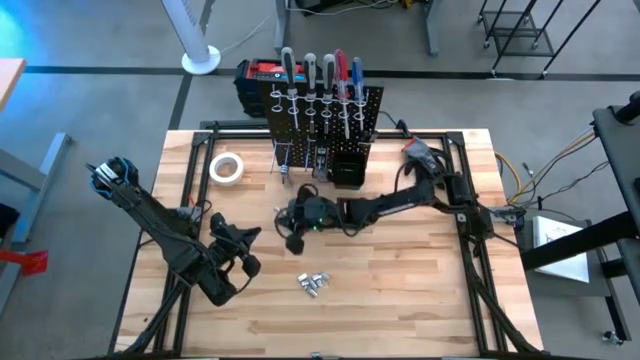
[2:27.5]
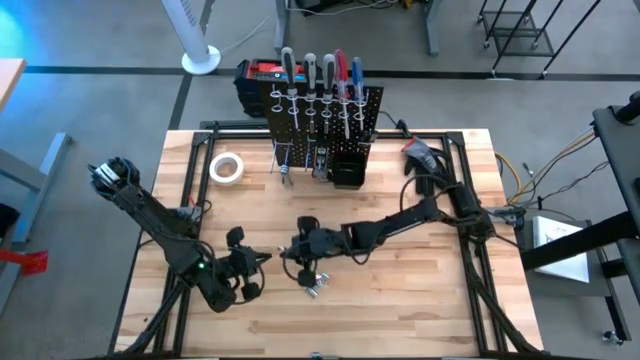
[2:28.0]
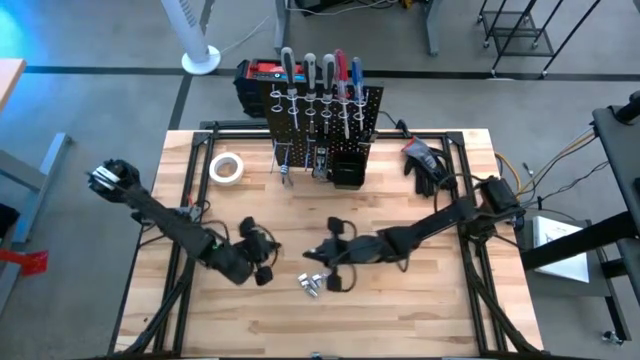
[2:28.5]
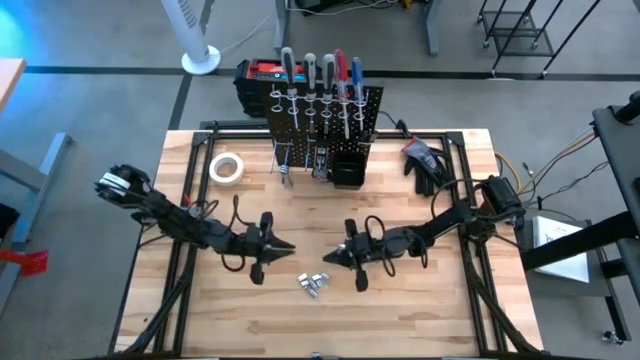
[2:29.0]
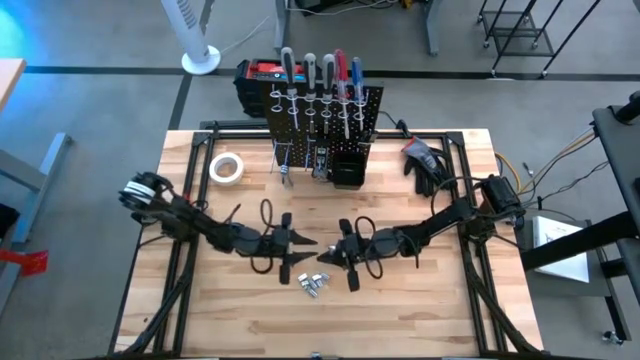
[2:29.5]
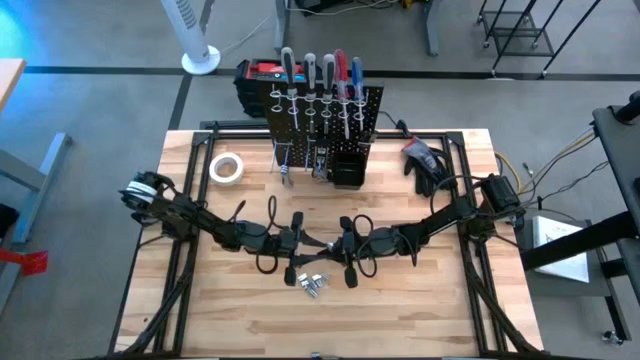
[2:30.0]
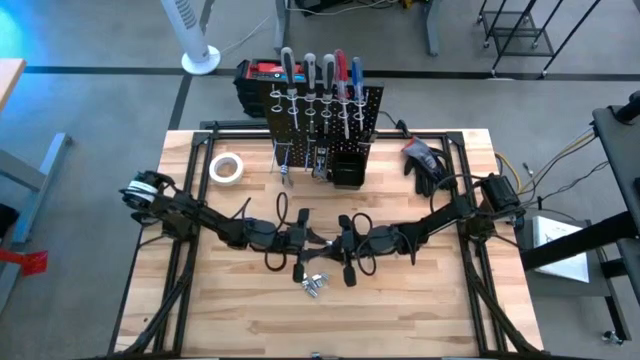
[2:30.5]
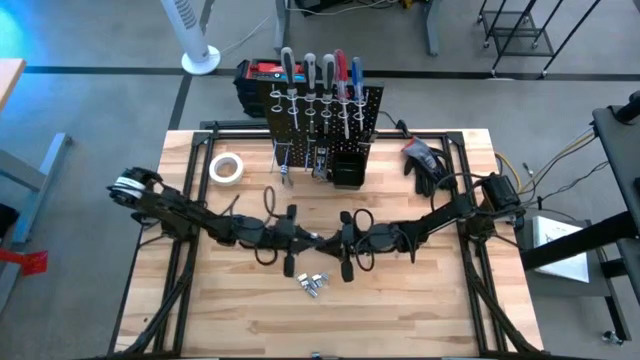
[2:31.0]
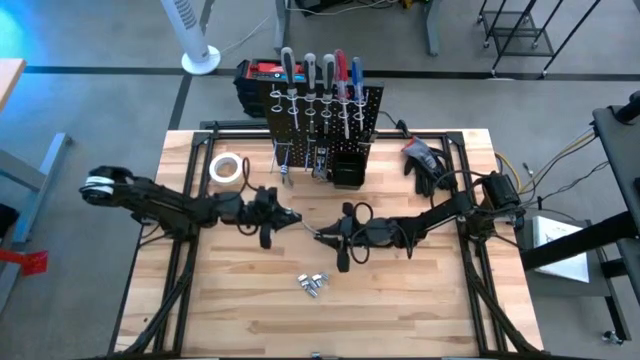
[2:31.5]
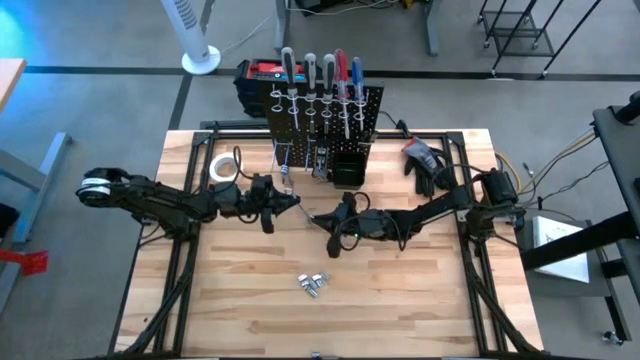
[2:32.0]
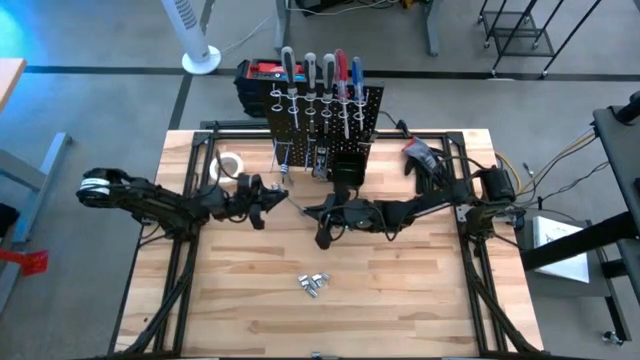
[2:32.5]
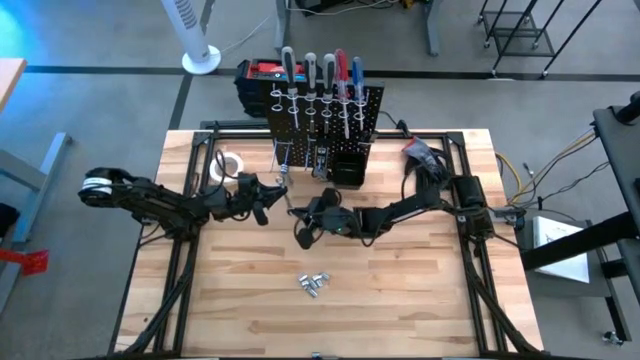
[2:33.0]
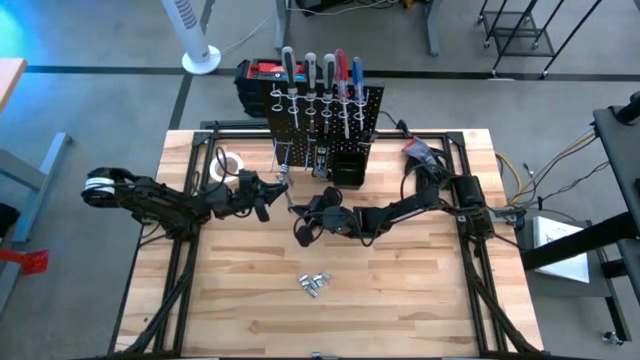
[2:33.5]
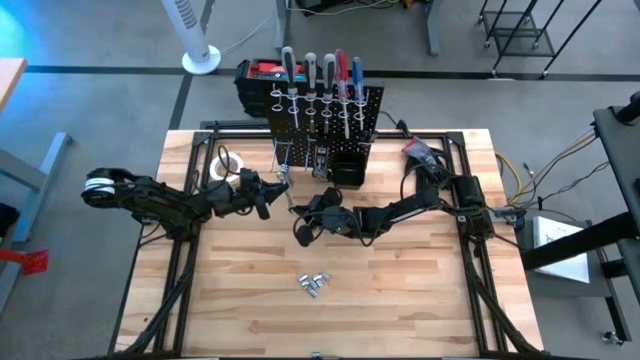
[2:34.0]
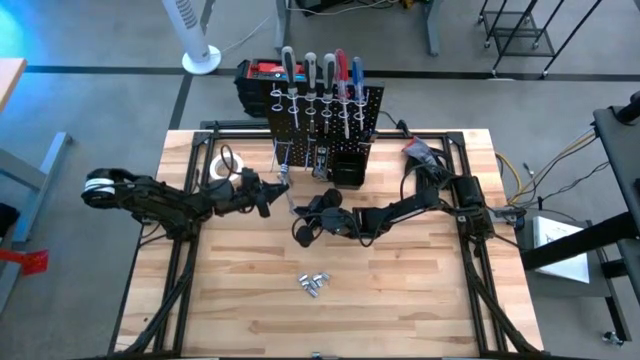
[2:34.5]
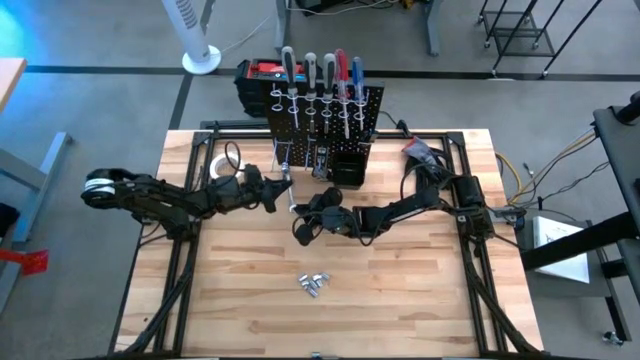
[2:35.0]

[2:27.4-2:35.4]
Task: Hang tools onto peg board
Hang the wrench on the peg board

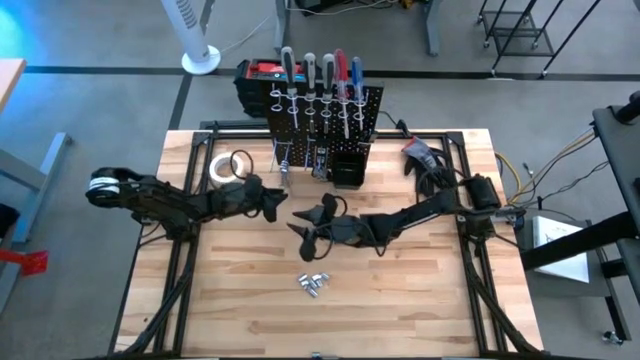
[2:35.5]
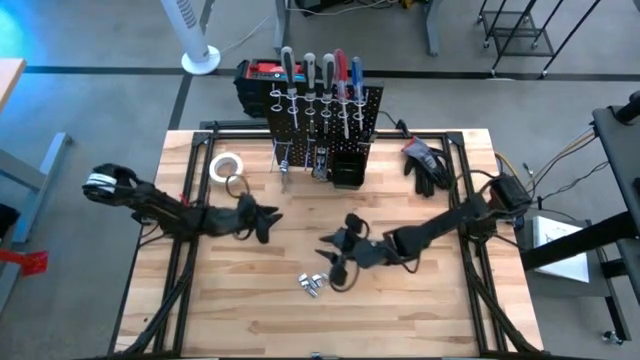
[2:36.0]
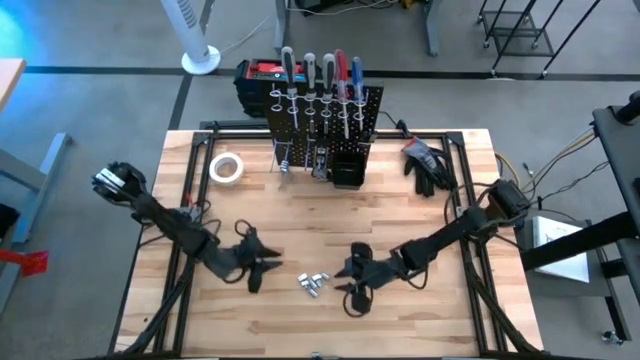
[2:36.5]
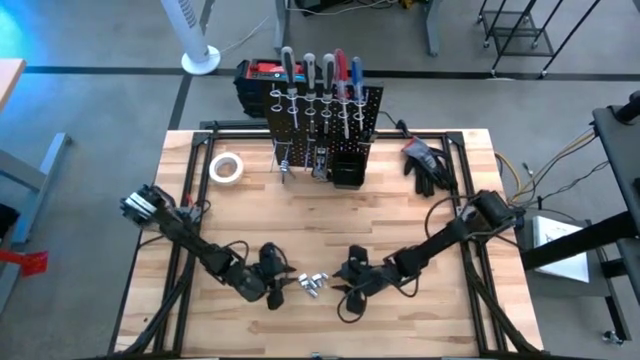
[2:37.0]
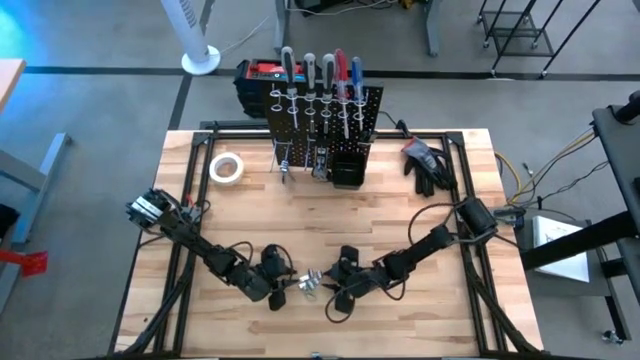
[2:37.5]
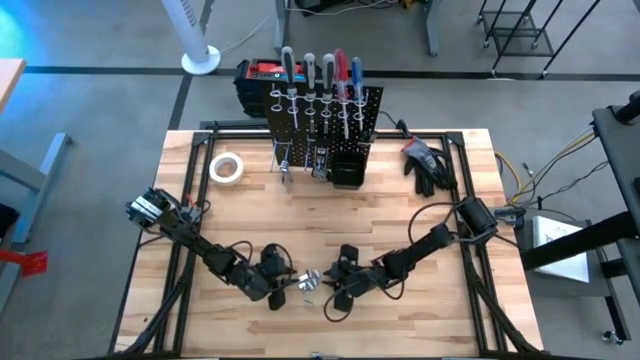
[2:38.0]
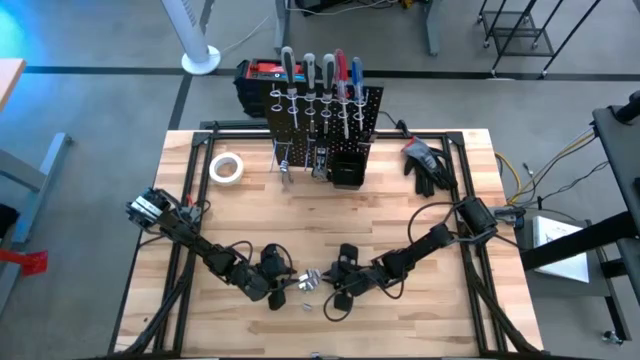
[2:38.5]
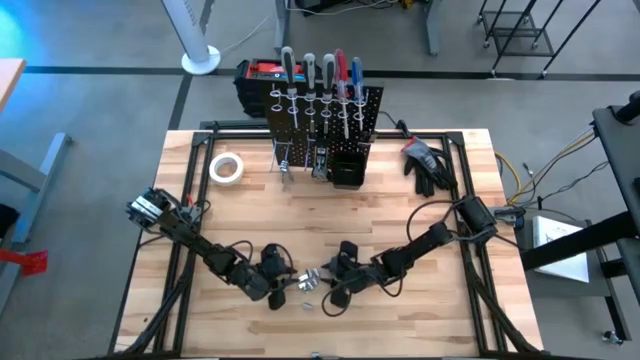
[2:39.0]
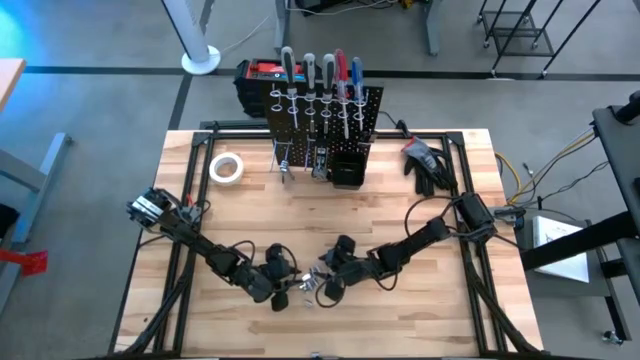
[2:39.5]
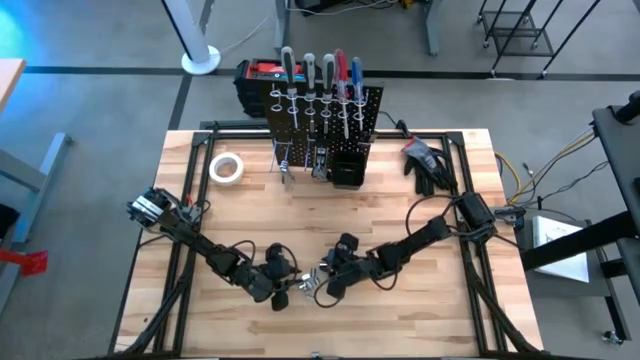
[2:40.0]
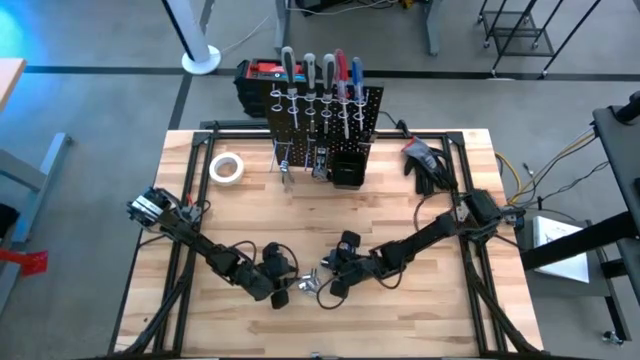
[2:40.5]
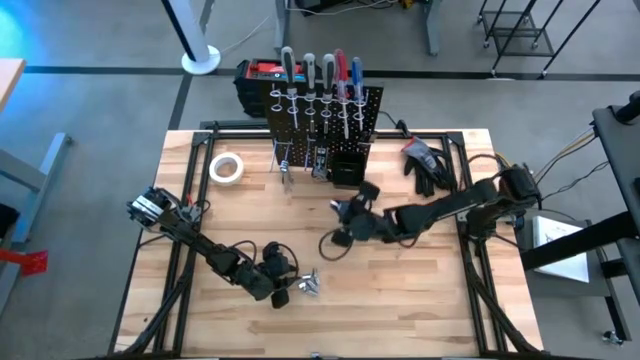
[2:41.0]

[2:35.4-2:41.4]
Put the socket wrench into the bin on the peg board

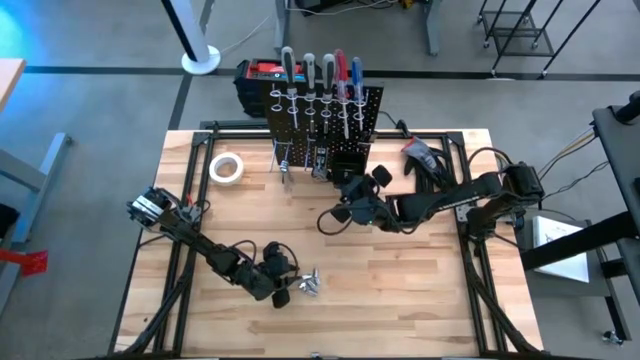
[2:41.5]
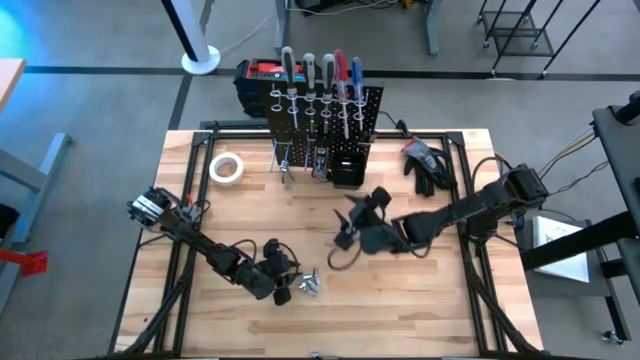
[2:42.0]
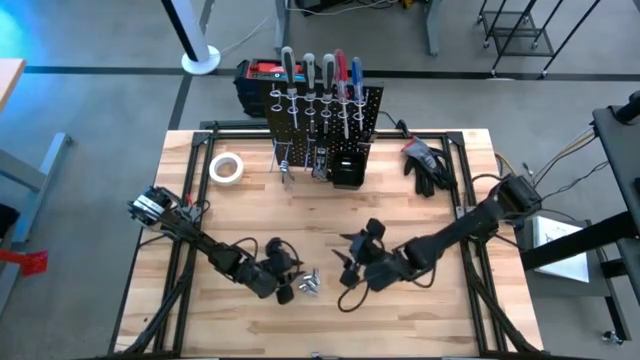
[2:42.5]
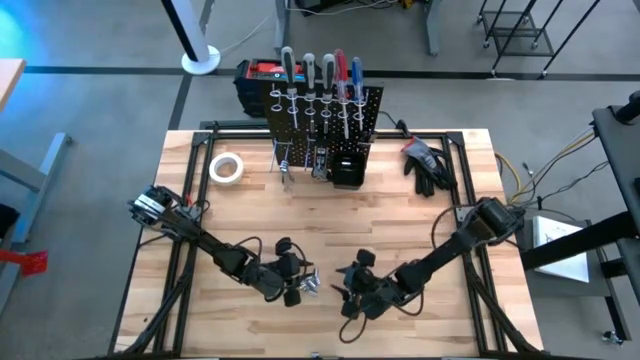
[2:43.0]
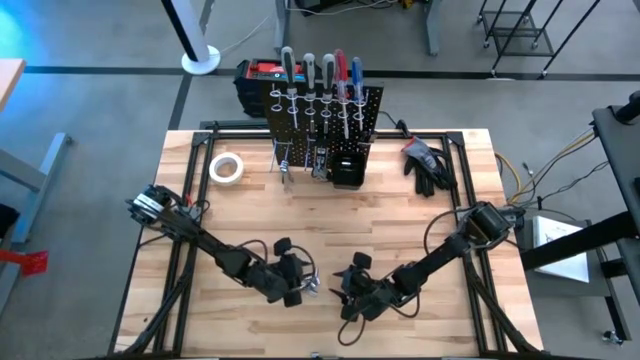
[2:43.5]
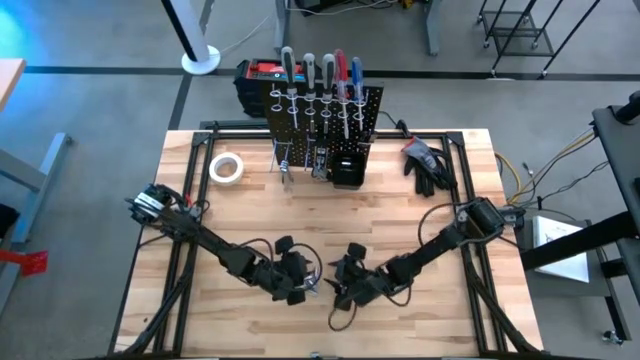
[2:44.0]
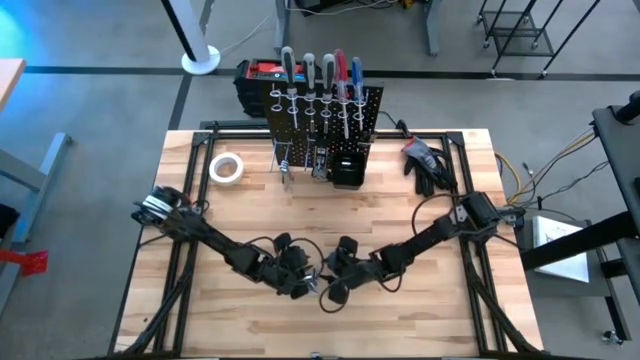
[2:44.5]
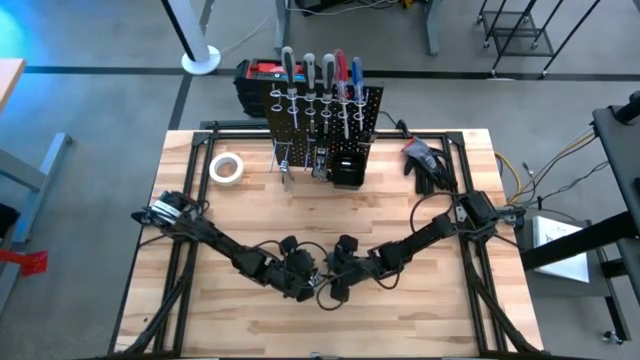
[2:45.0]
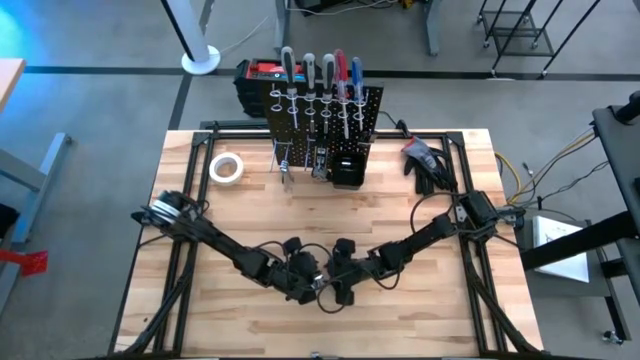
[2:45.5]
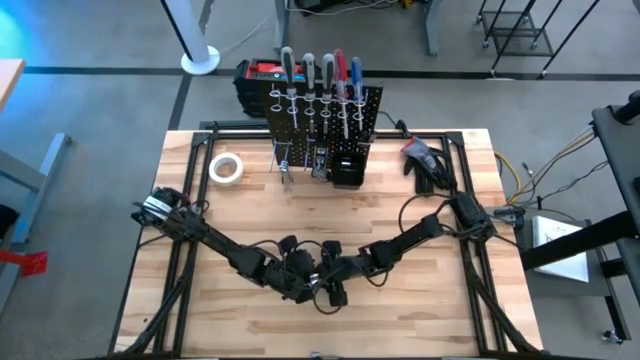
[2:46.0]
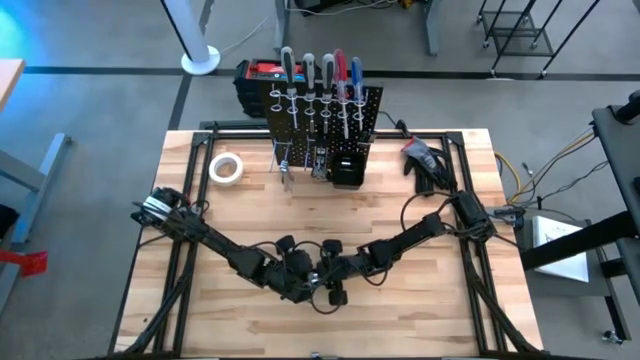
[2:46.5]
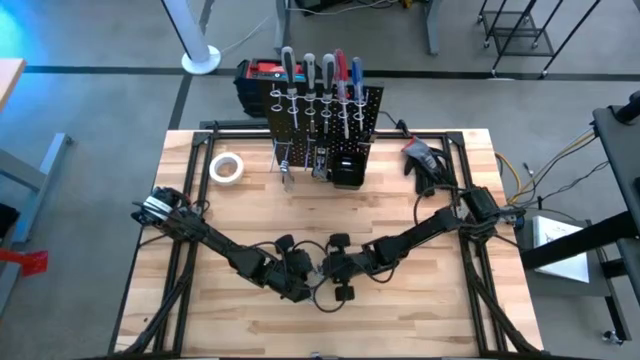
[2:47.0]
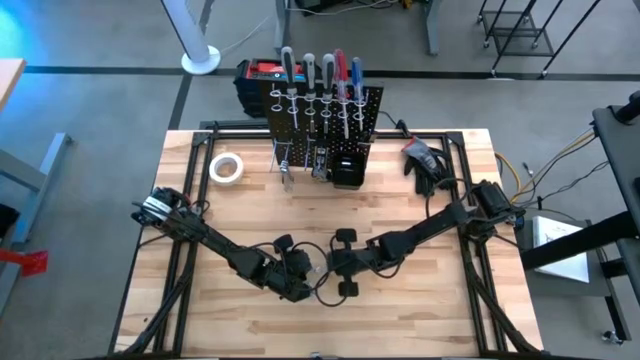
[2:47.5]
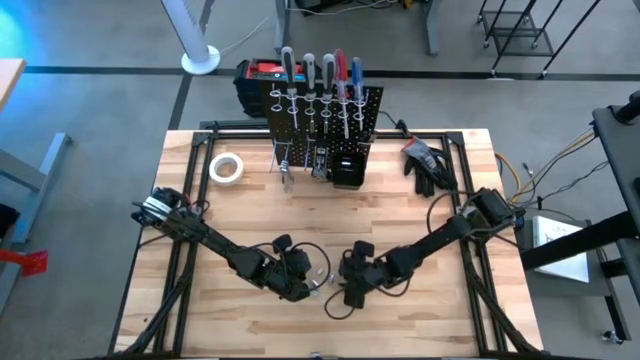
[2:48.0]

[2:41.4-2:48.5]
Put the socket wrench into the bin on the peg board

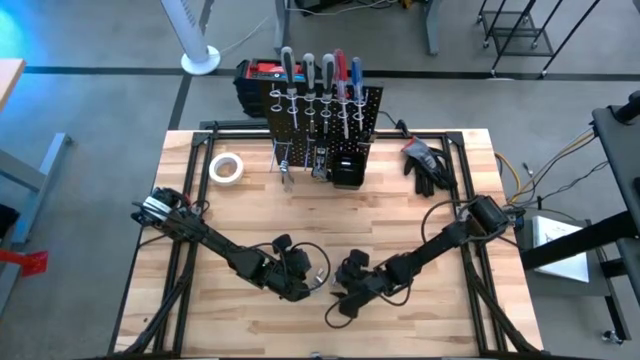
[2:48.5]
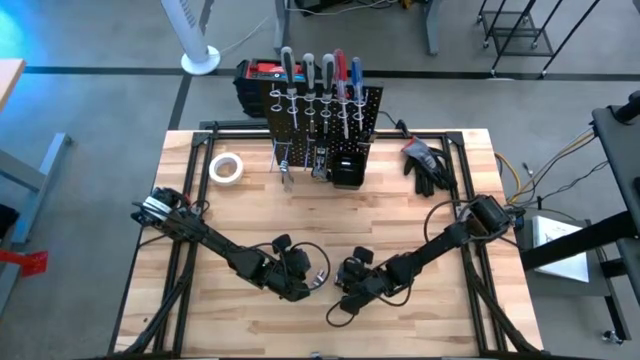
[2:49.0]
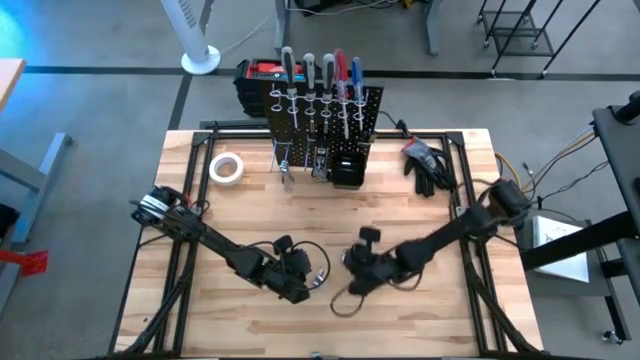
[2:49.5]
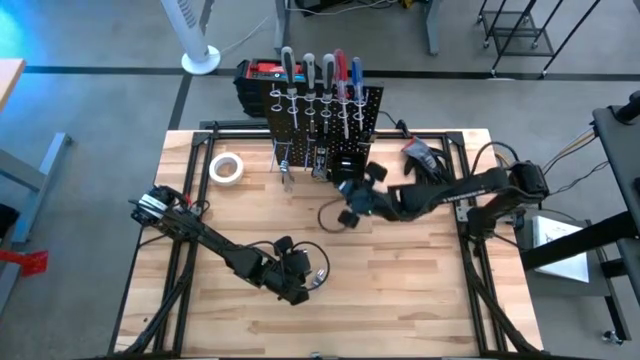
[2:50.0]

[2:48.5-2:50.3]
Put the socket wrench into the bin on the peg board
